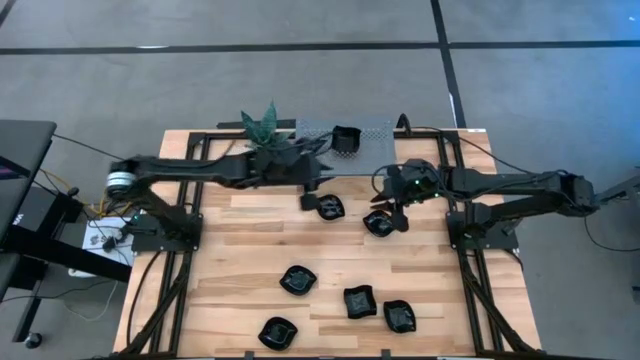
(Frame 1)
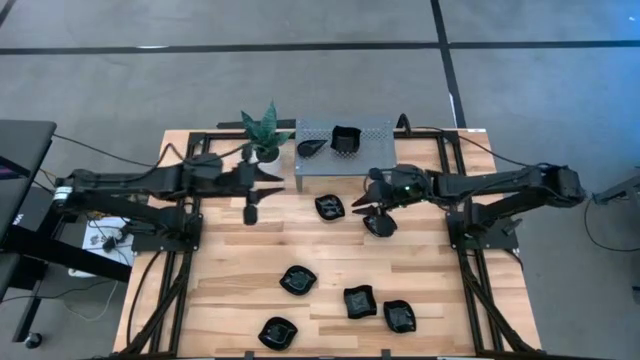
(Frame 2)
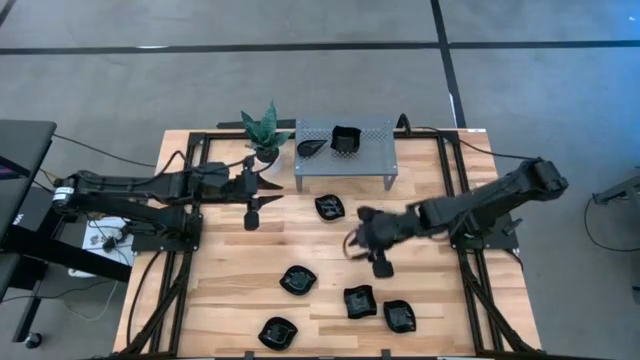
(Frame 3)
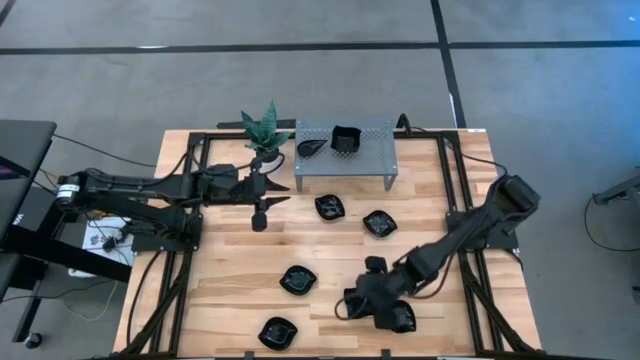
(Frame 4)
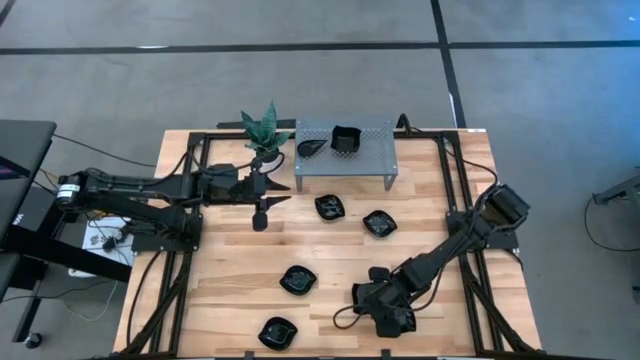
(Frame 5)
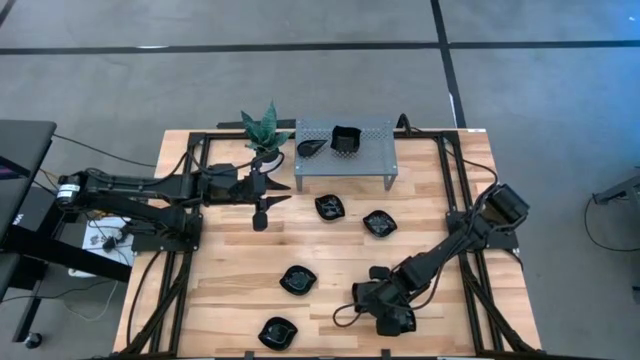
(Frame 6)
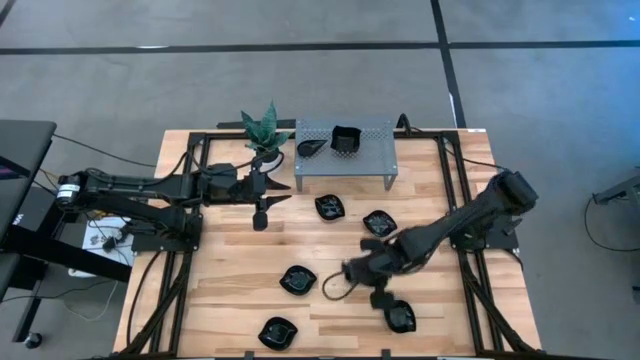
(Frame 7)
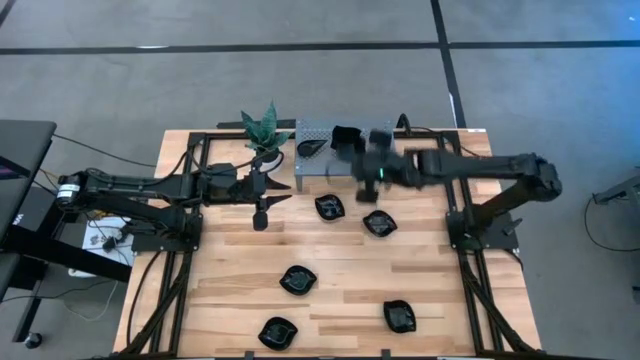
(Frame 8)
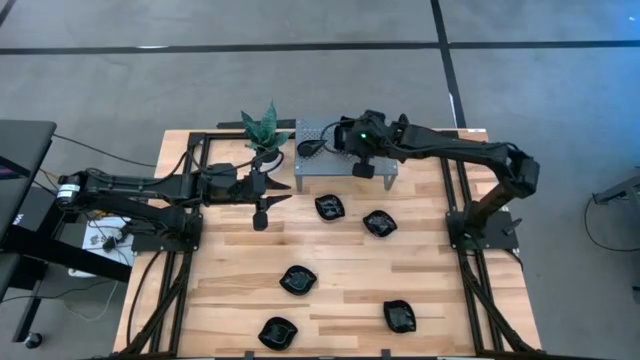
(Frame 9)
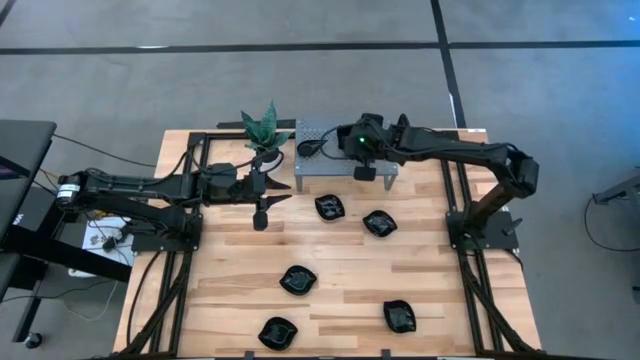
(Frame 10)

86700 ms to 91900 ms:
Task: Pick & Place Mini shaped plates
Stack the distorted square plate on top of the distorted square plate on the shelf

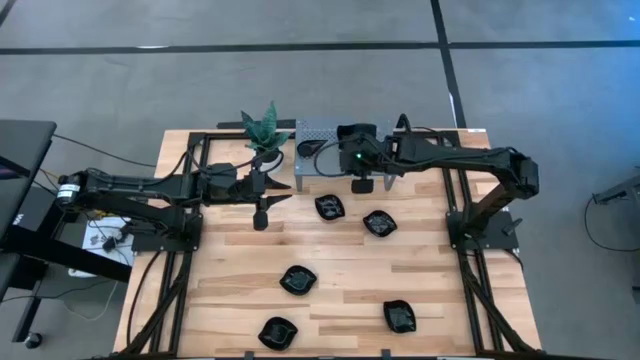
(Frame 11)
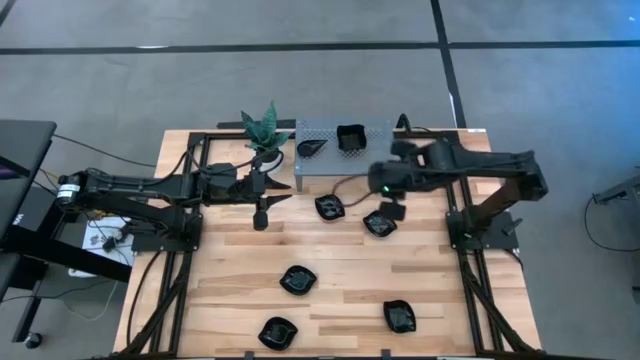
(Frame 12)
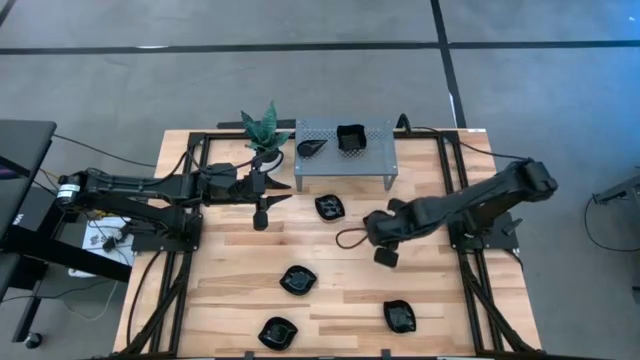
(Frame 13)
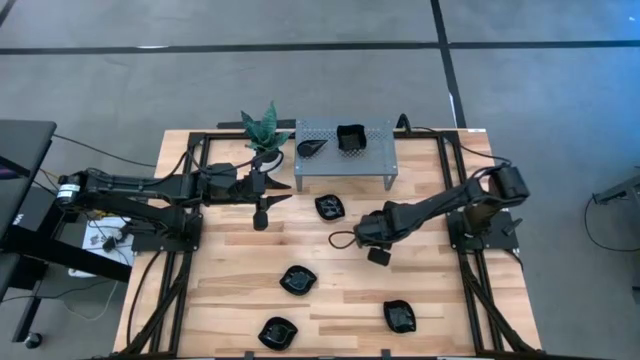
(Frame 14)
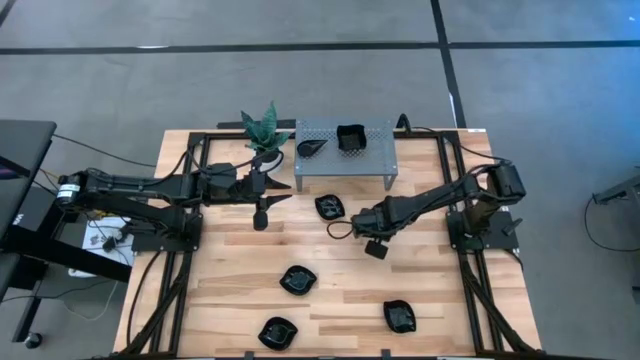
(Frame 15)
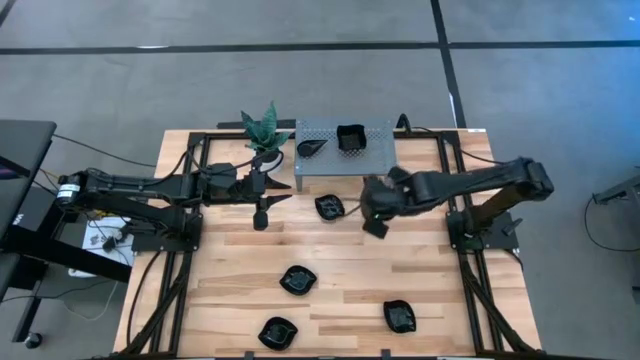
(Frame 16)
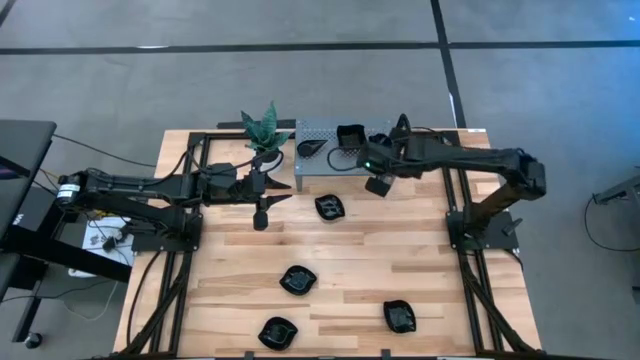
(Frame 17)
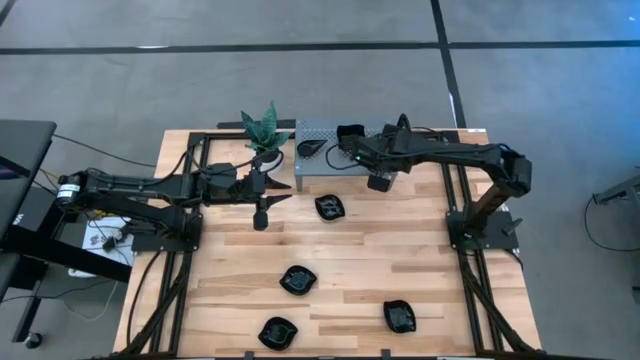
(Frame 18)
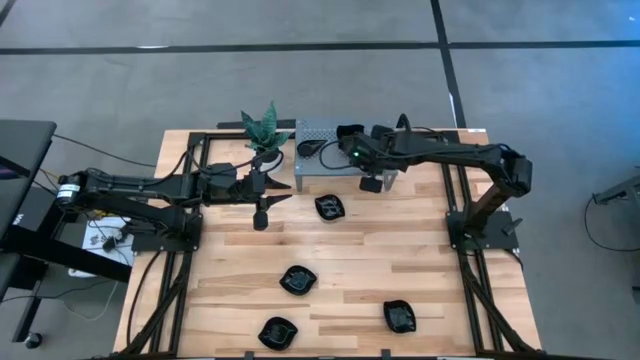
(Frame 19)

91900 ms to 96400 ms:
Put the leaf-shaped plate on the shelf

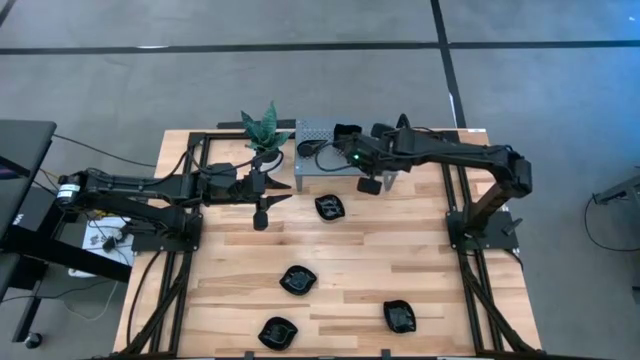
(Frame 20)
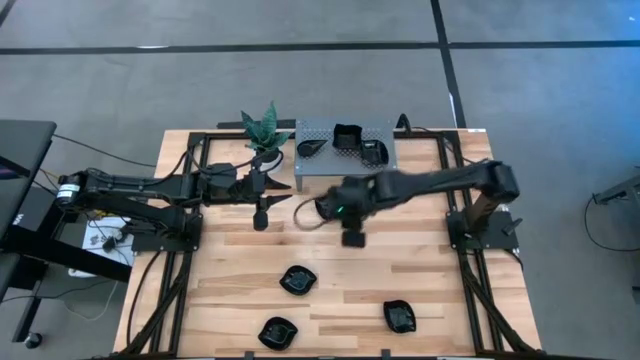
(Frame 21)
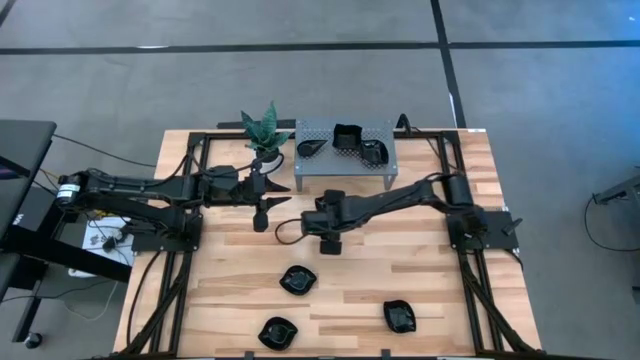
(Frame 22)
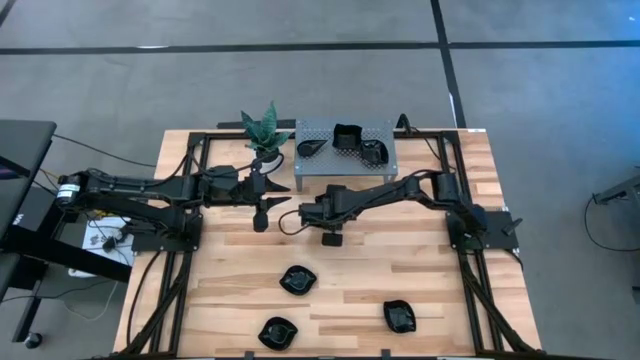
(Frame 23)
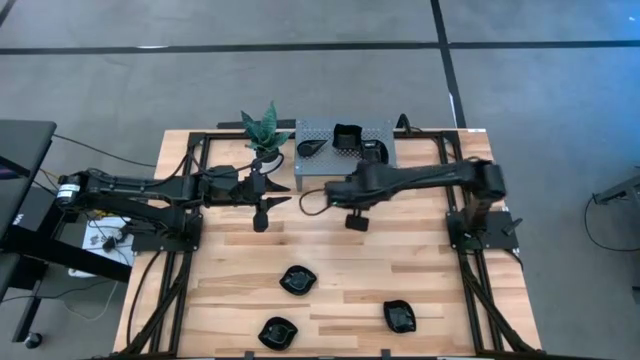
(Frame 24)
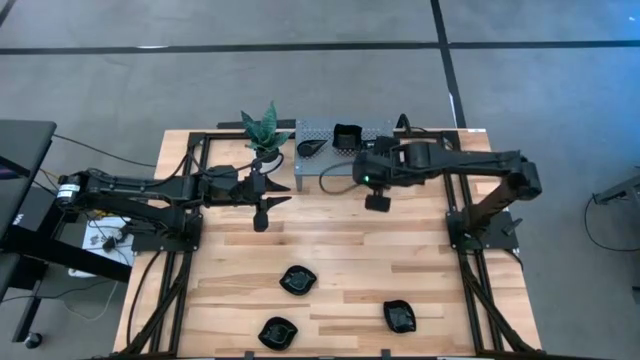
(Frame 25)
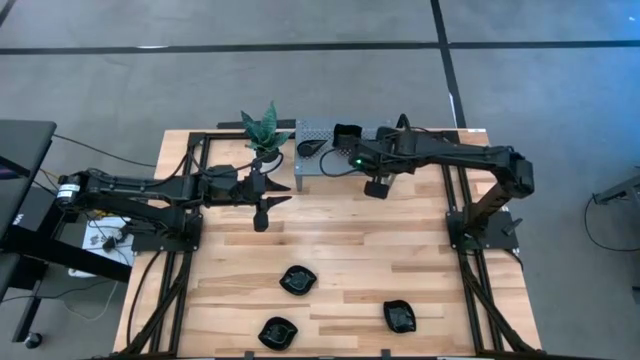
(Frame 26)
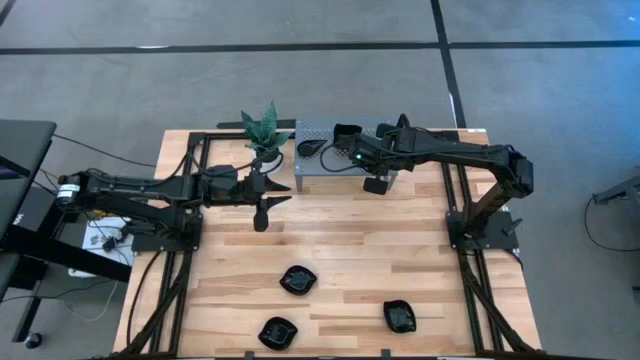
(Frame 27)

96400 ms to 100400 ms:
Stack the leaf-shaped plate on top of the leaf-shaped plate on the shelf
